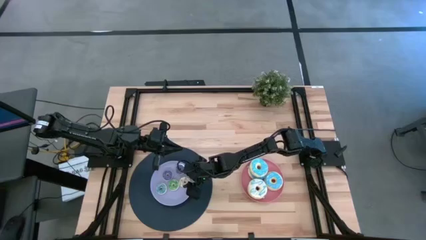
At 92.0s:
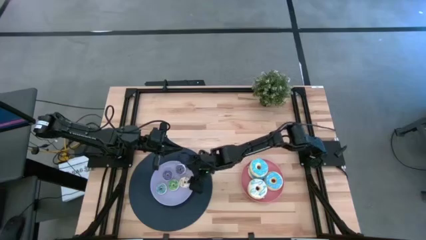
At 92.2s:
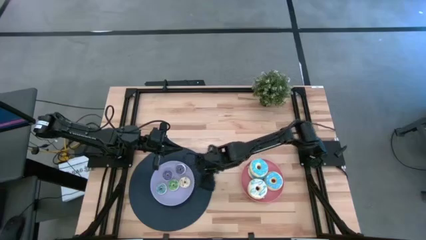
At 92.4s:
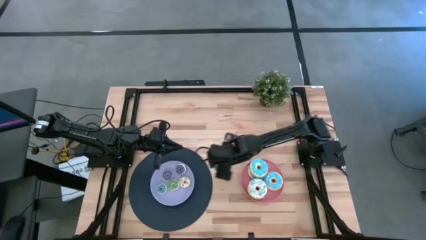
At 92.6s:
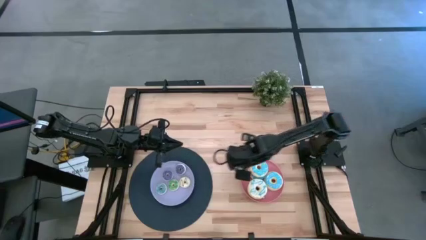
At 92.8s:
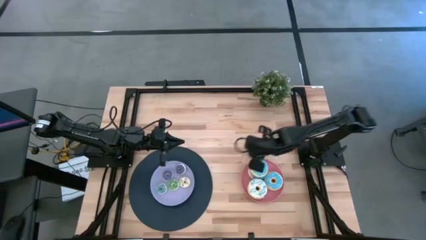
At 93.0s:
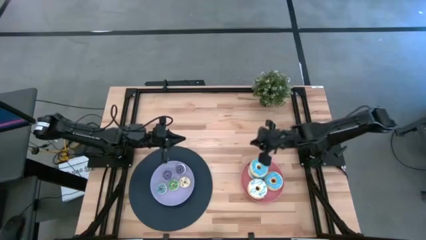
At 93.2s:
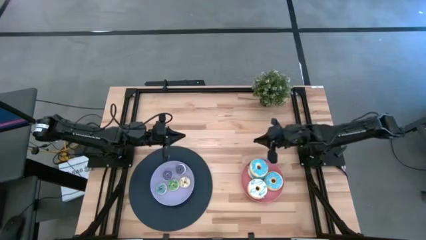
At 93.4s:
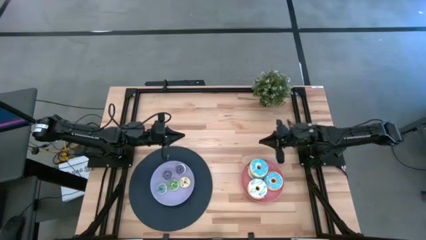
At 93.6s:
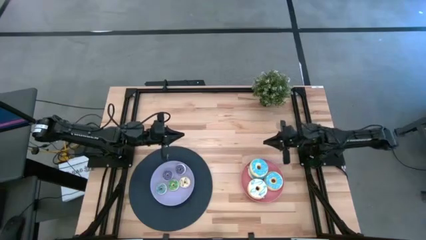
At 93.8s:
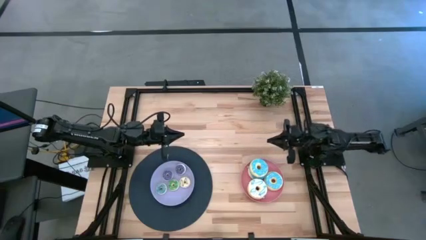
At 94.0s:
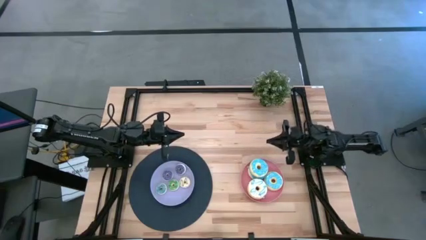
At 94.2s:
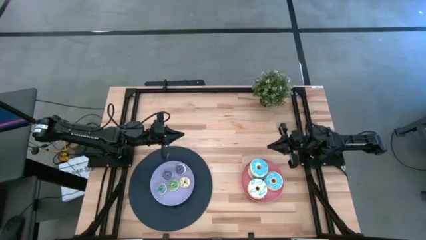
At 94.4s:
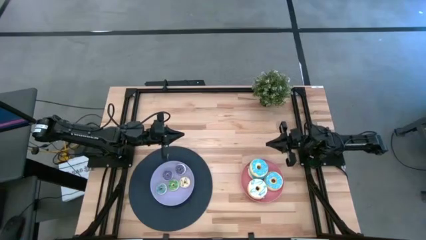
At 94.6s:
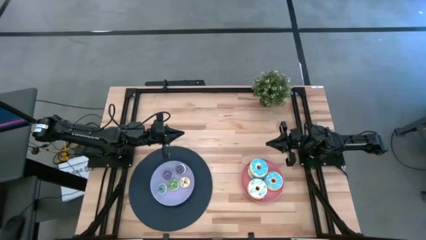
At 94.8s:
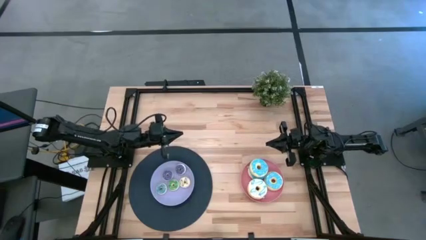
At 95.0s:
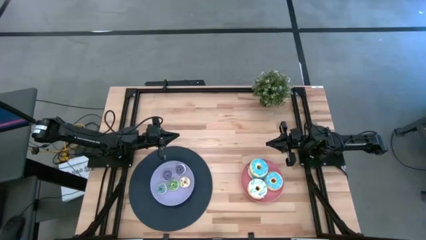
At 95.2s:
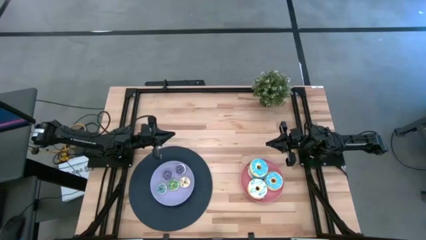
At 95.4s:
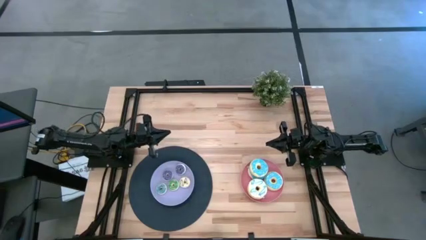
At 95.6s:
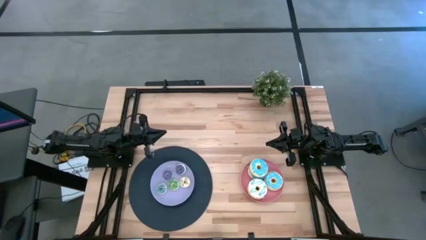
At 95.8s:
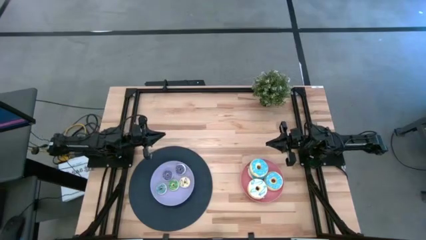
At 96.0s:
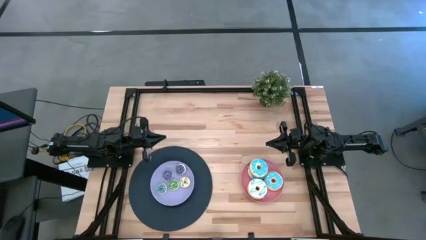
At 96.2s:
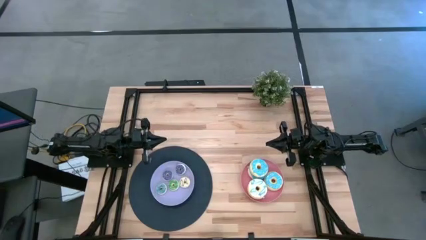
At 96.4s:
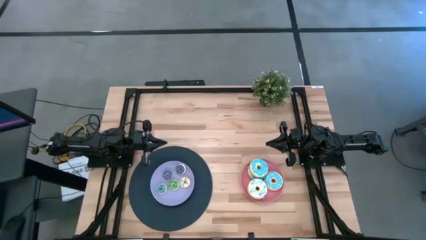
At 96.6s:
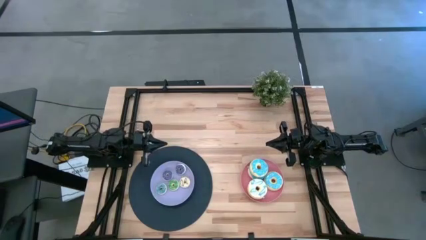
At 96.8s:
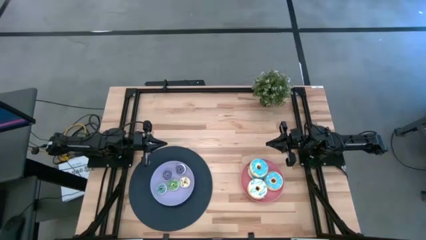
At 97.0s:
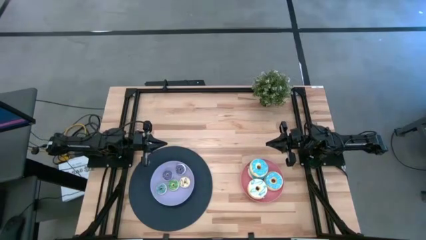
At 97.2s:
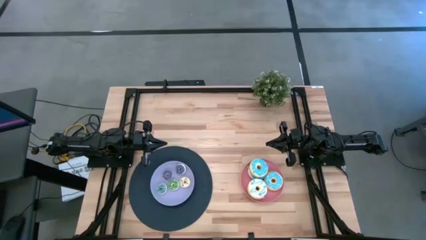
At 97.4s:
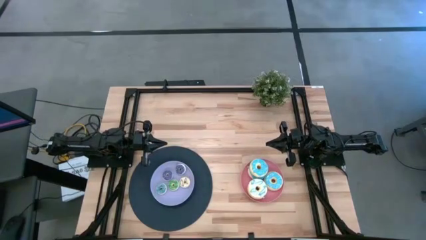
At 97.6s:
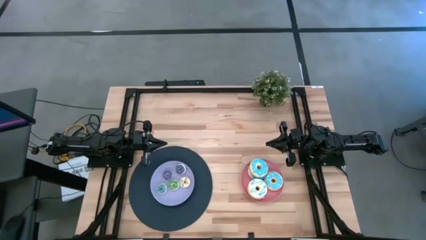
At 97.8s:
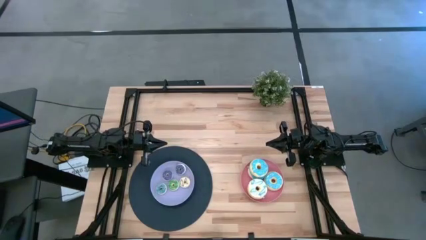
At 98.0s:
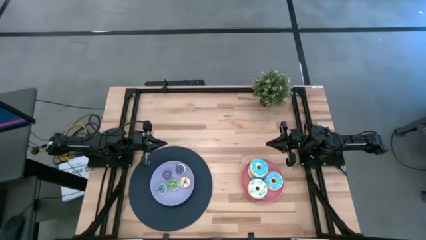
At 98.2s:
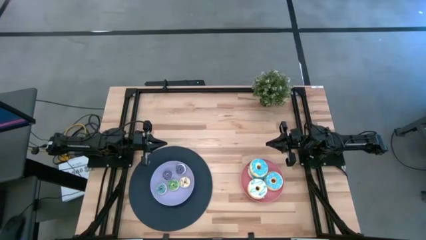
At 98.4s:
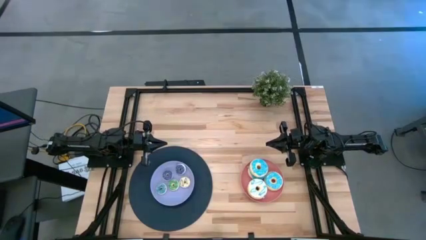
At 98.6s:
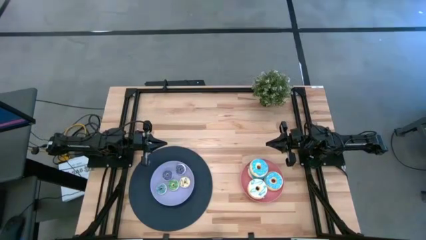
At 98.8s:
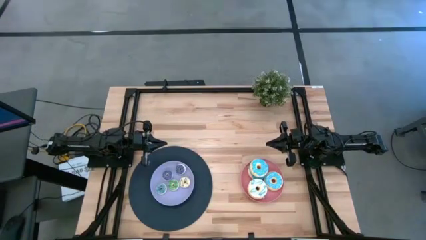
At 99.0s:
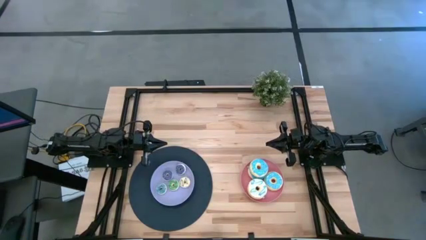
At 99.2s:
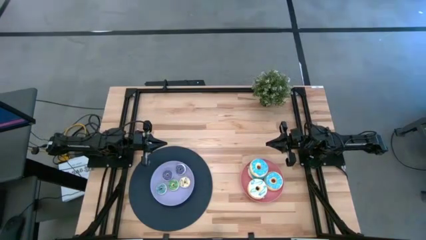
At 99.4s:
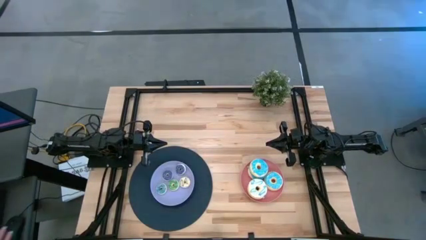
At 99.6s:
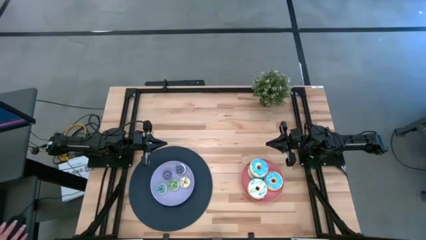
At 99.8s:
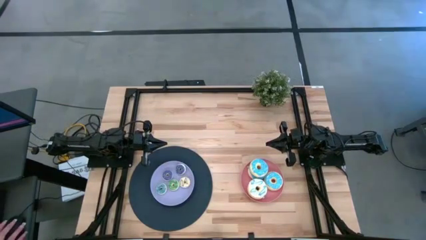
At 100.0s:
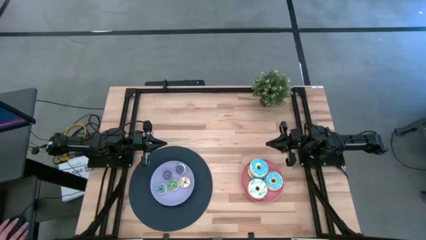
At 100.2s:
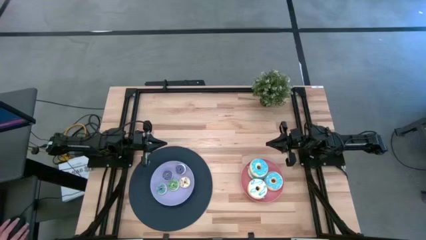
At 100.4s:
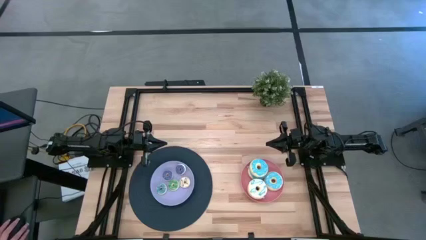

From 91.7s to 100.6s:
Task: Pick & Place donuts
Return to Home Position

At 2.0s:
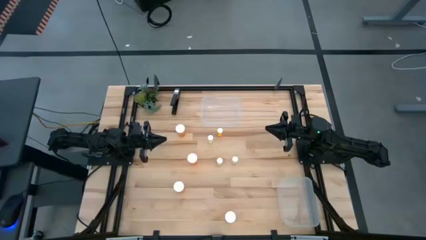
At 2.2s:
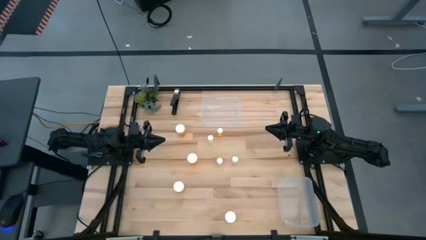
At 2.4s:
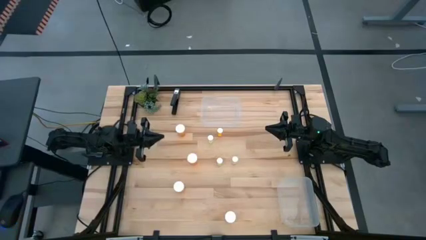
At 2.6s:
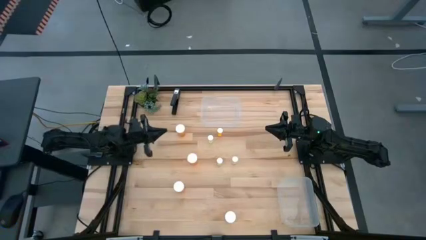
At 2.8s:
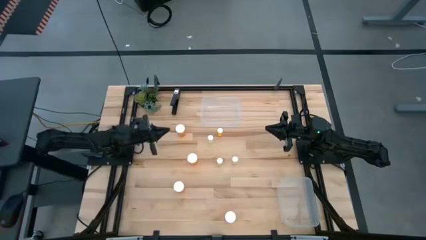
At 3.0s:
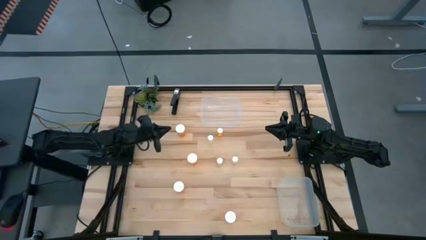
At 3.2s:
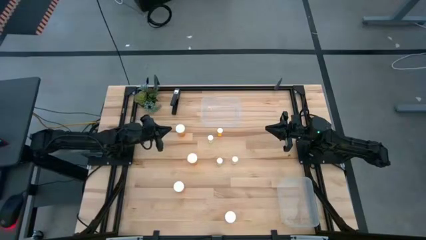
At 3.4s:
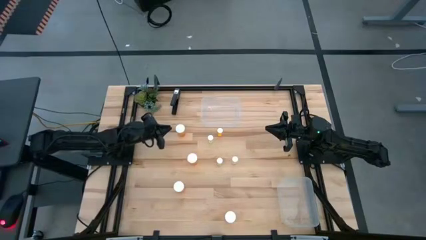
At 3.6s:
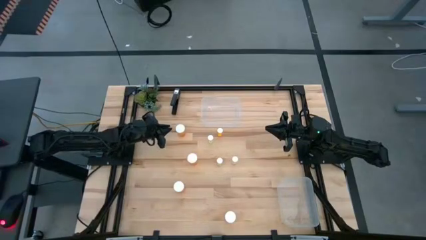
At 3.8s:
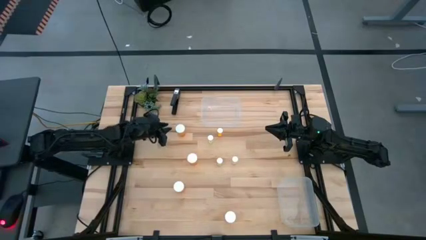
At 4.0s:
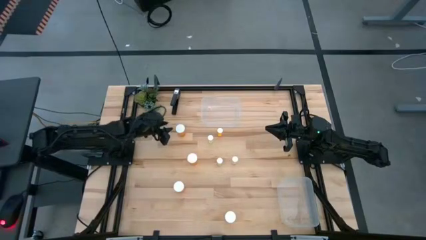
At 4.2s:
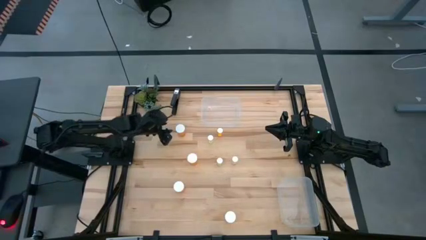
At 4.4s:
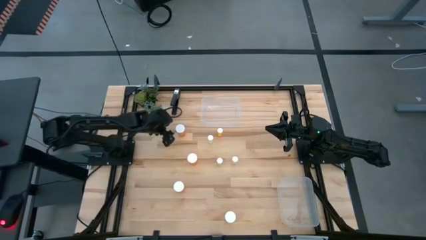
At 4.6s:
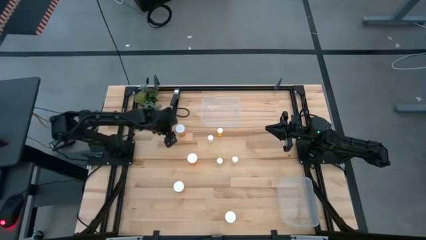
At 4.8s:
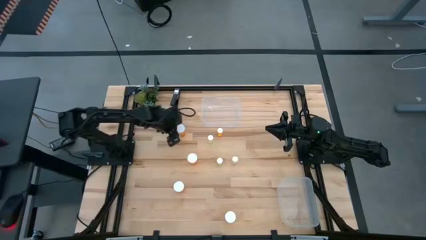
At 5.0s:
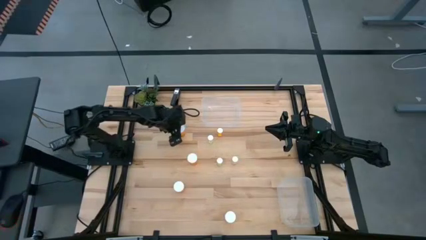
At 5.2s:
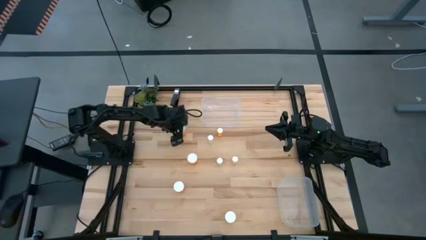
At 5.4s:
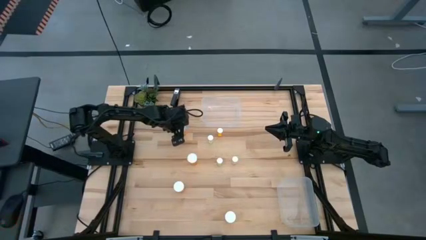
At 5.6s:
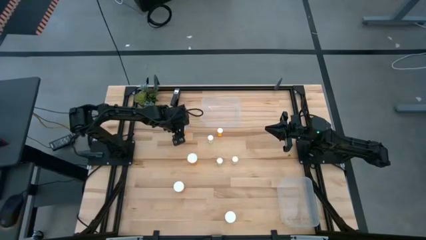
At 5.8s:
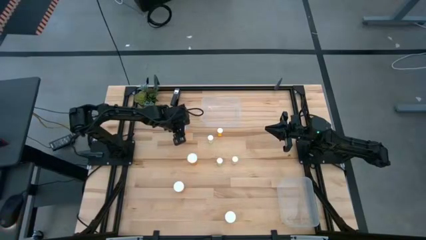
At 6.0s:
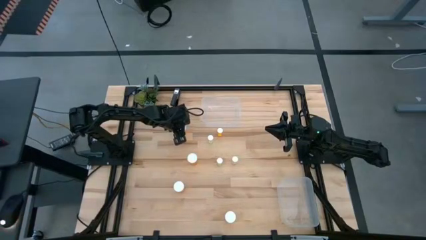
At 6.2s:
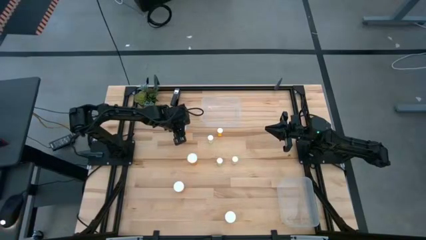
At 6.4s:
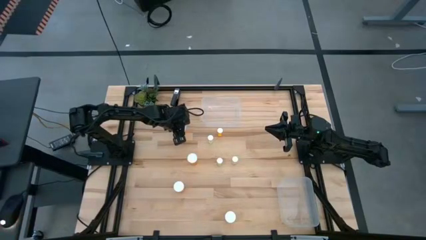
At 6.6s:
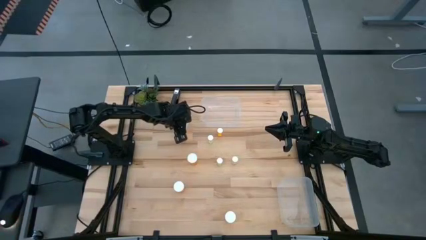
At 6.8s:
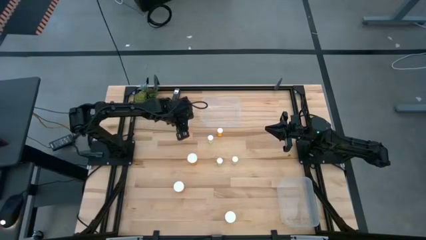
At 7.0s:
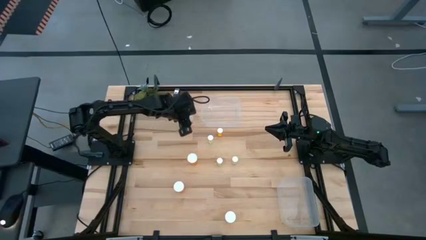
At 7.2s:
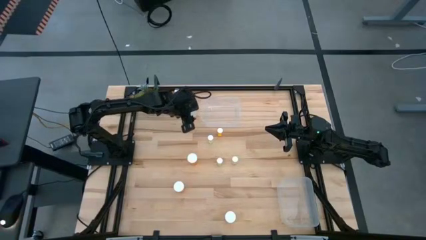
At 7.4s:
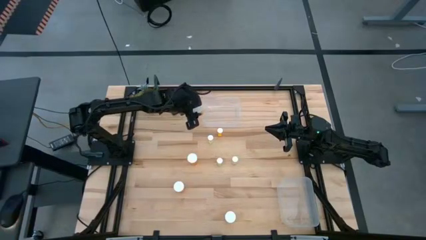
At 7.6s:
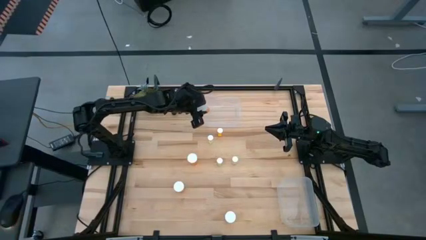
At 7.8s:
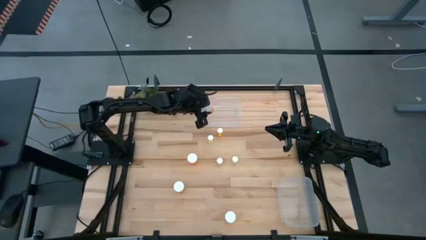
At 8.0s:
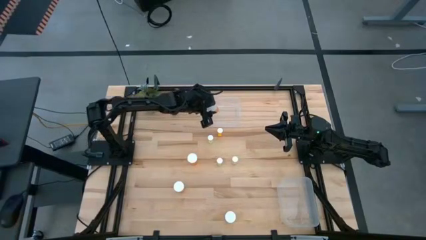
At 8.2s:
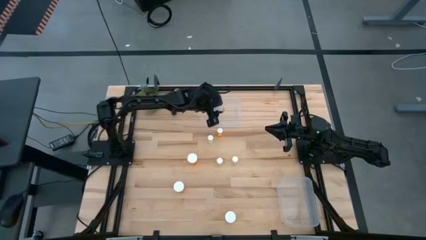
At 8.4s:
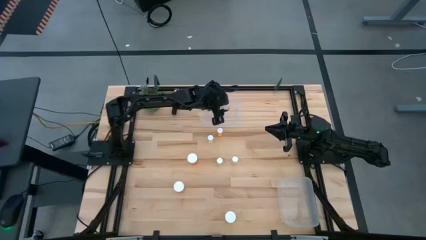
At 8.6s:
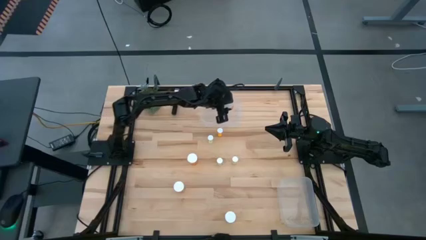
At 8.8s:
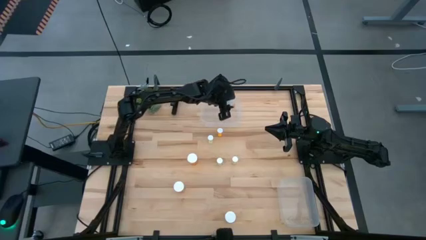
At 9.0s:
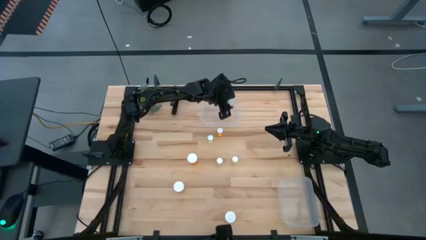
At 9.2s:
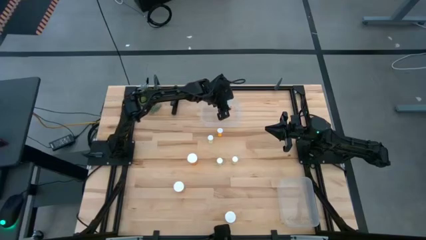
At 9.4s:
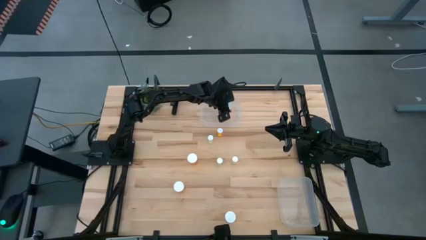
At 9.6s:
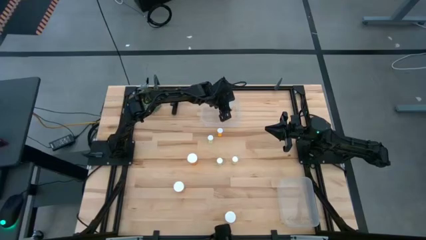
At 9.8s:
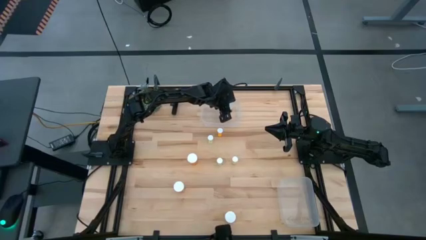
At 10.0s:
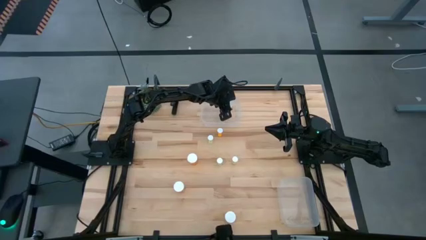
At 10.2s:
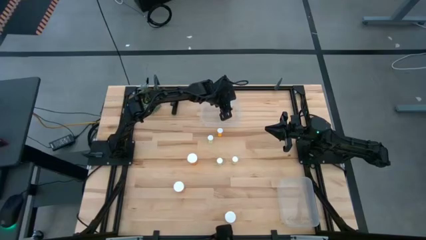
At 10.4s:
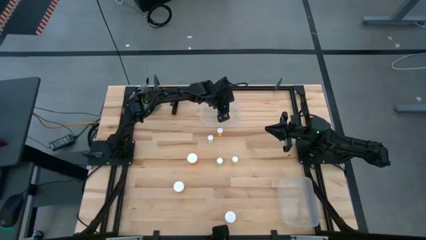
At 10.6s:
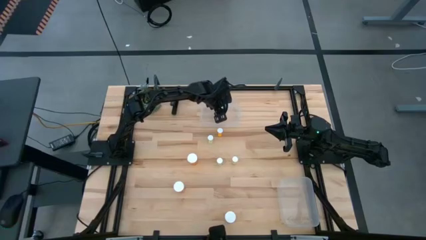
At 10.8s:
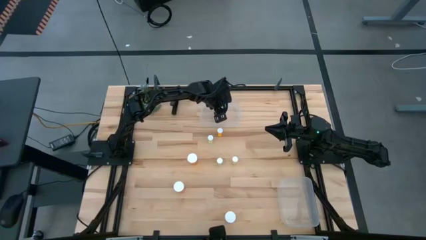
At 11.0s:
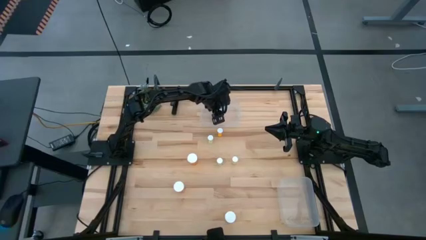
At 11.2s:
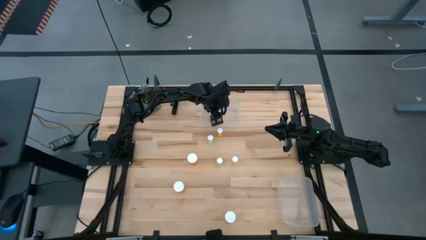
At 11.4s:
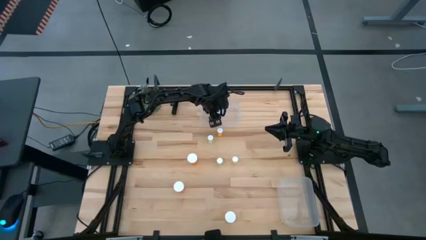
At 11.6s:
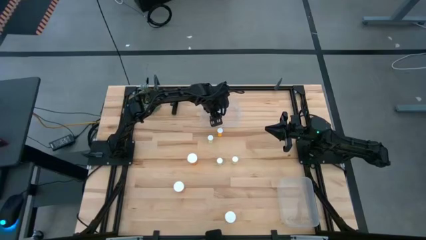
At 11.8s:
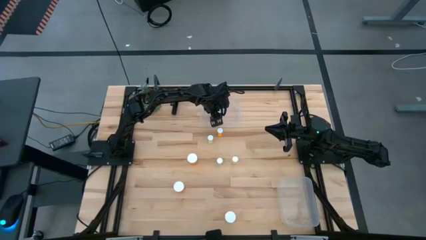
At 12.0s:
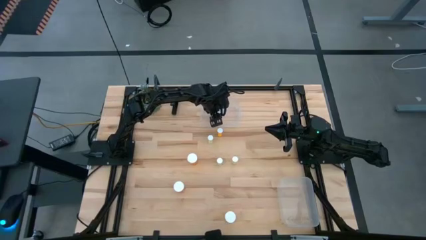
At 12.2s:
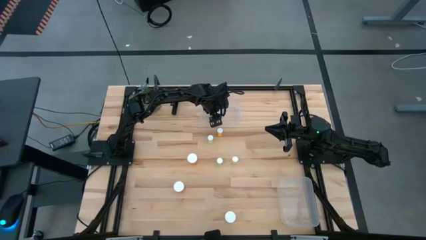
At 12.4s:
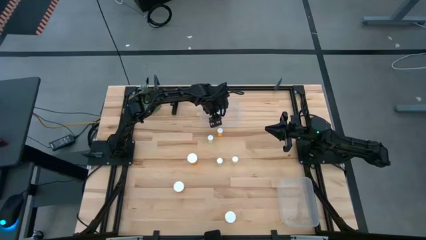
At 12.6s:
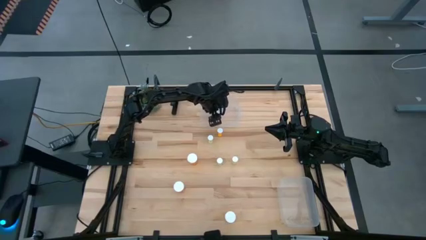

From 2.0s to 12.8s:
Task: Pick and place medicine bottles into bin by pill shape (circle, oval)
Put the orange capsule bottle into the top transparent bin
